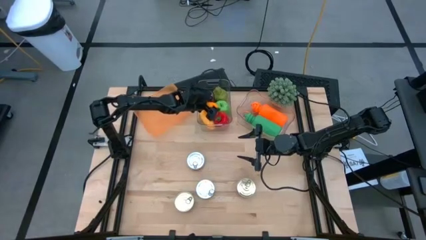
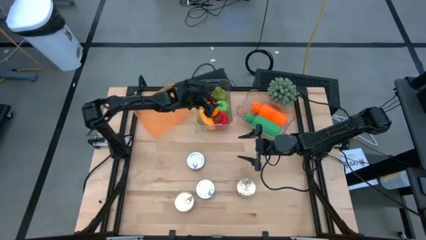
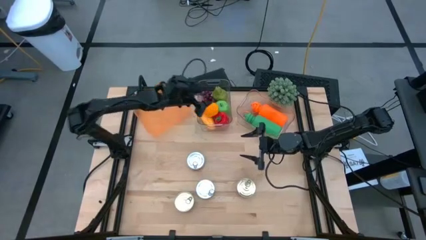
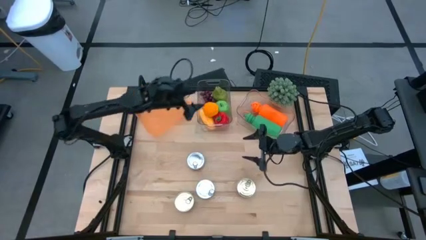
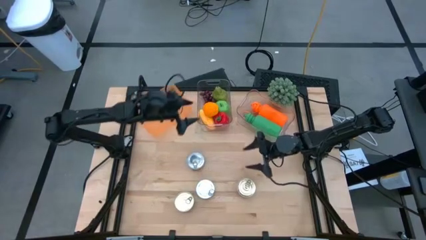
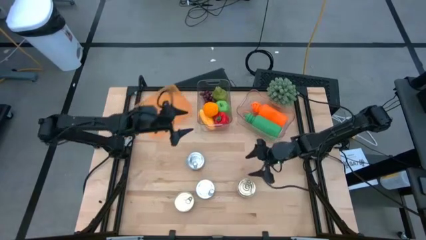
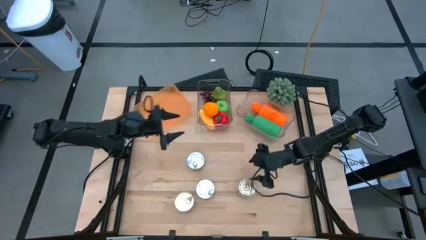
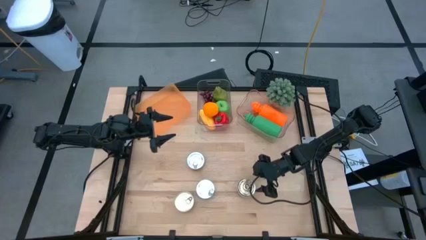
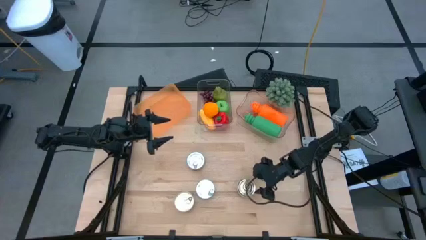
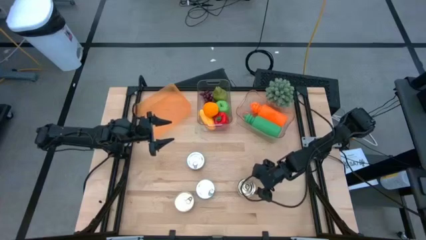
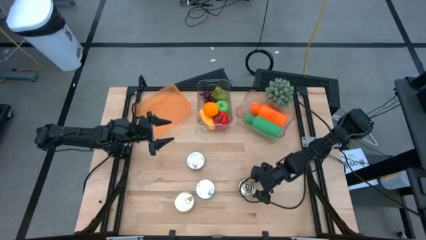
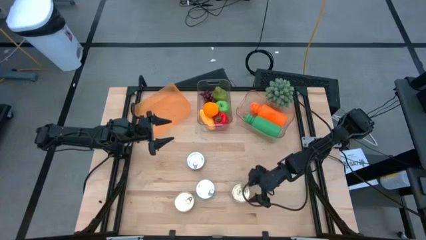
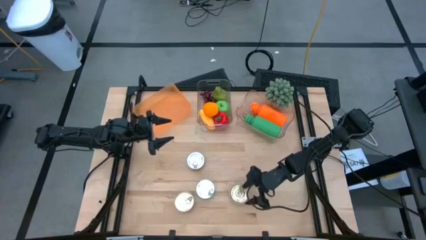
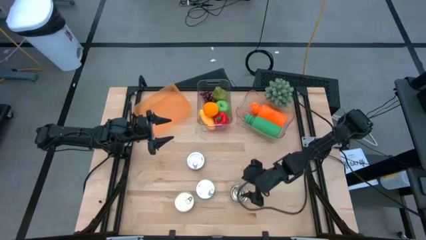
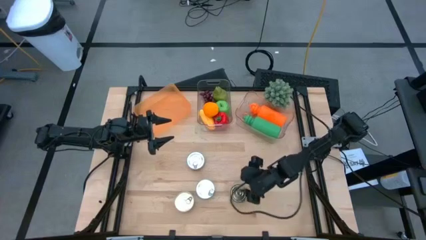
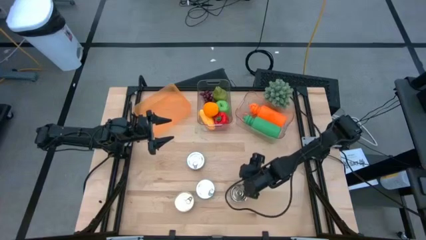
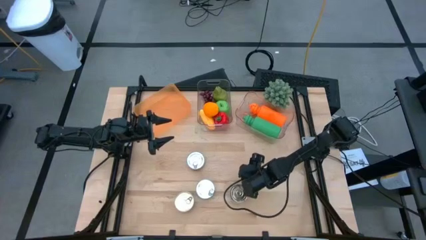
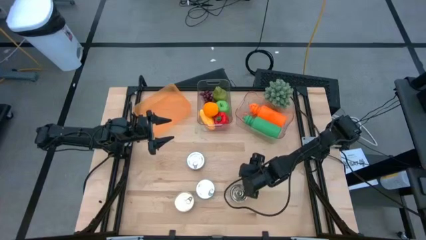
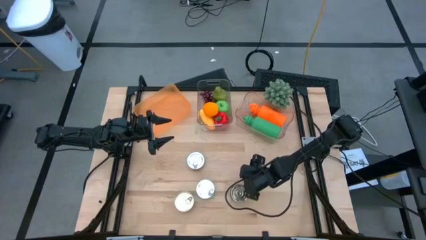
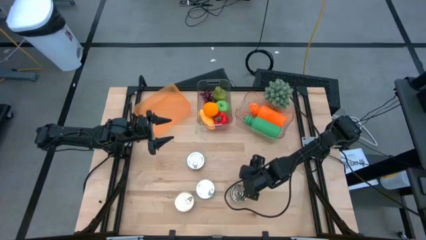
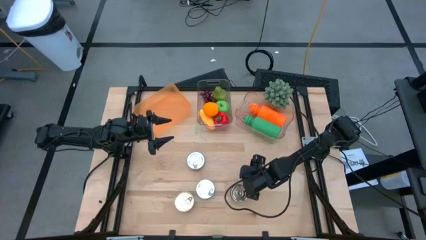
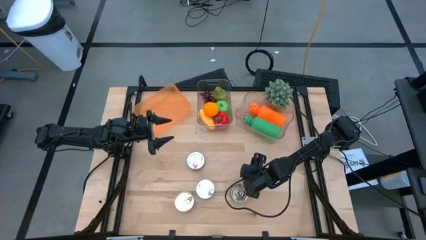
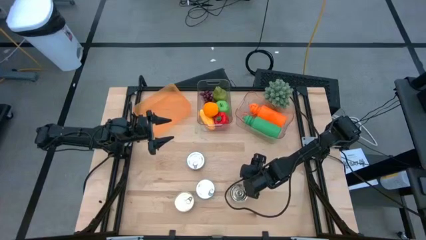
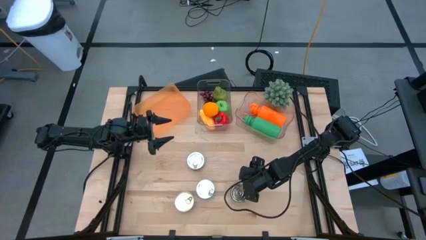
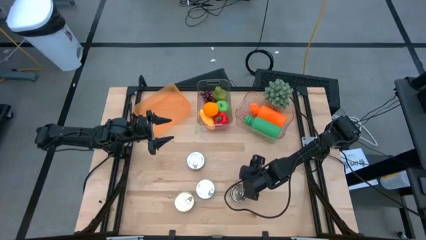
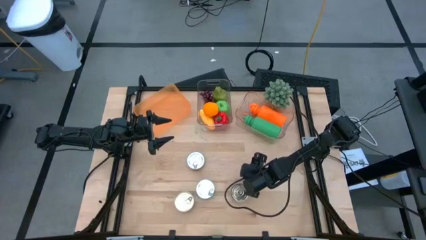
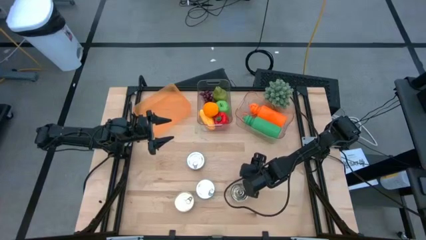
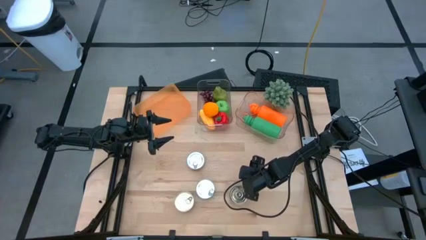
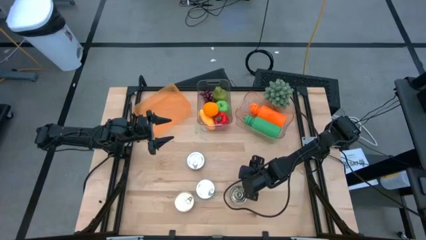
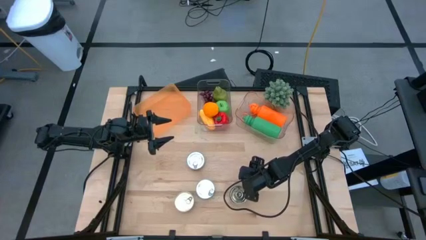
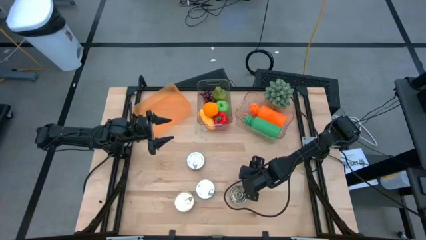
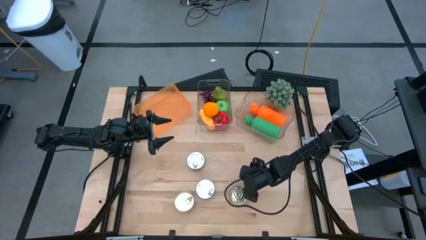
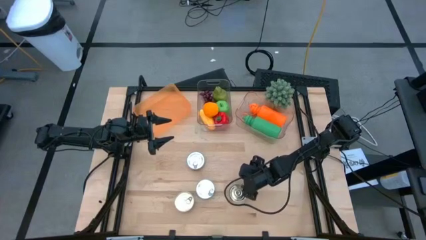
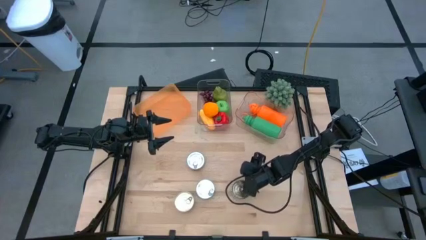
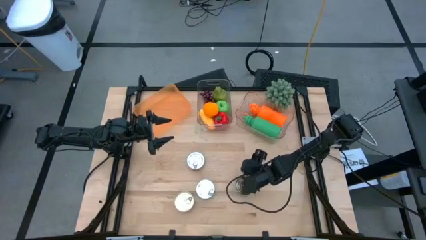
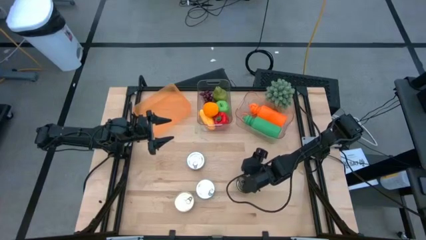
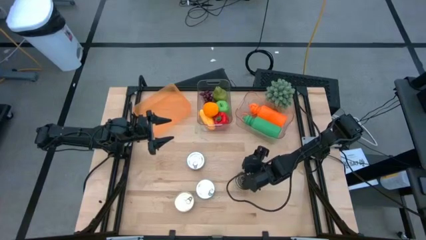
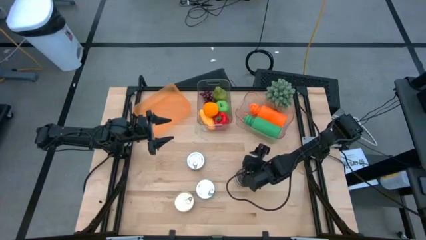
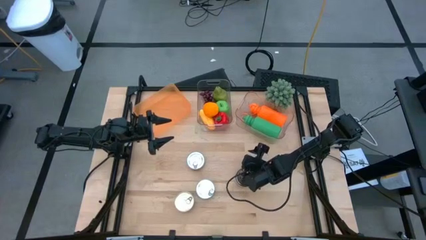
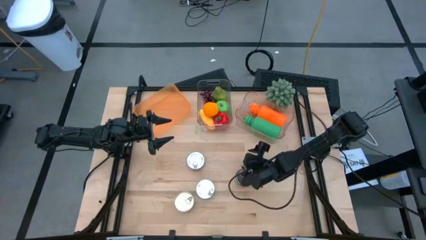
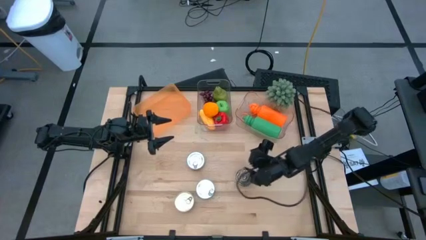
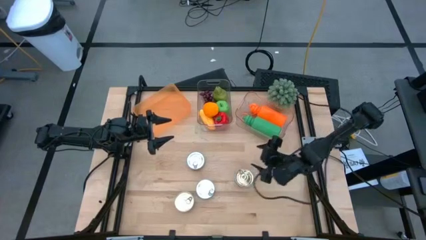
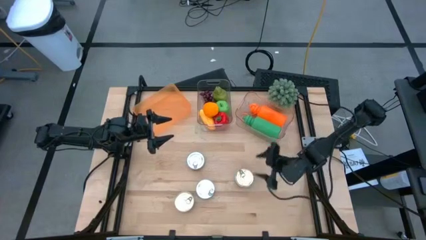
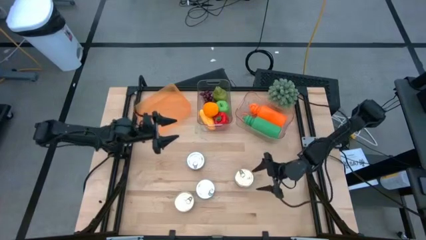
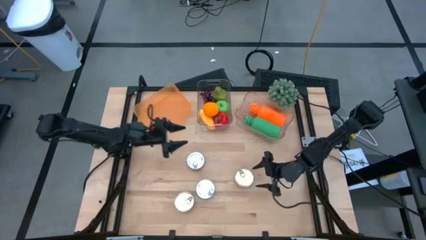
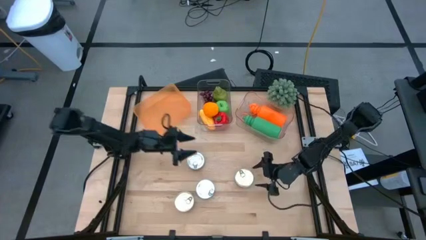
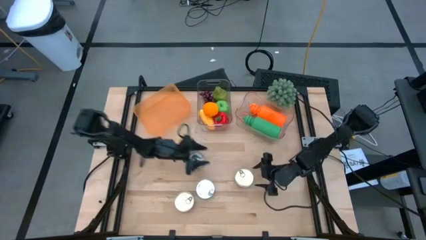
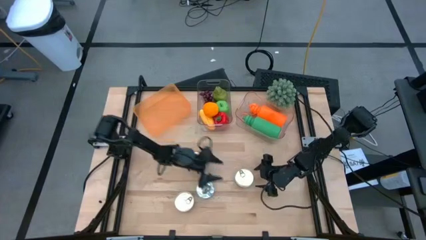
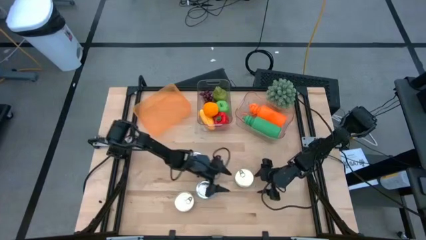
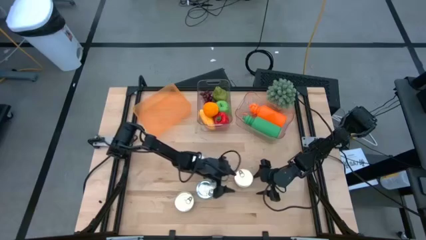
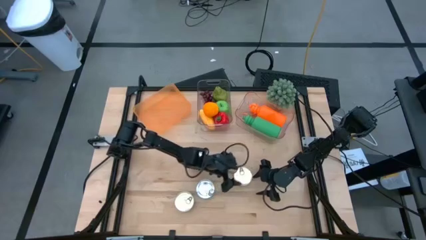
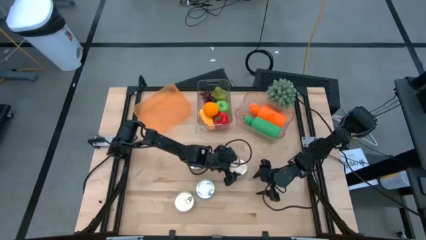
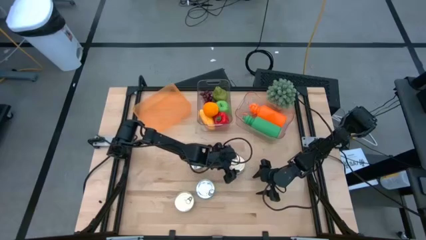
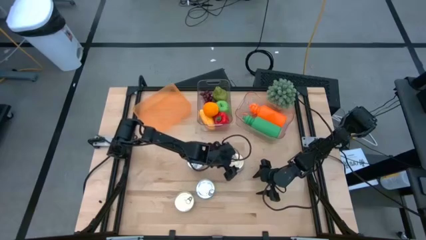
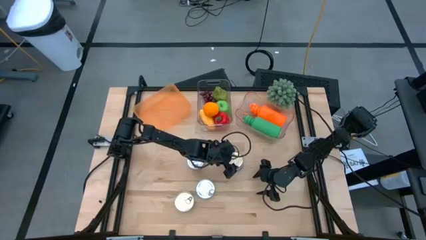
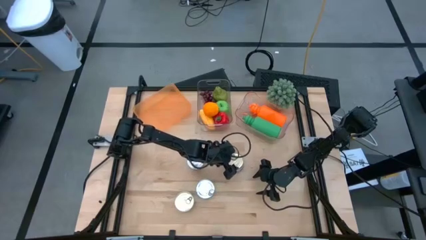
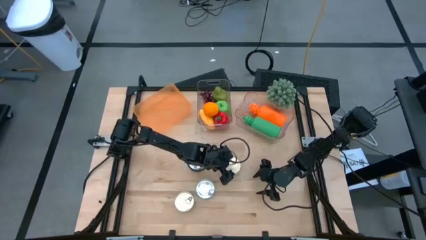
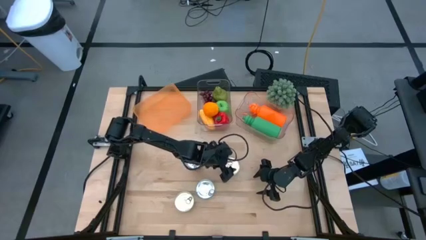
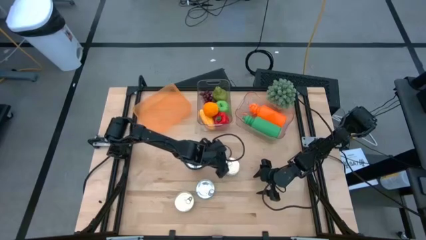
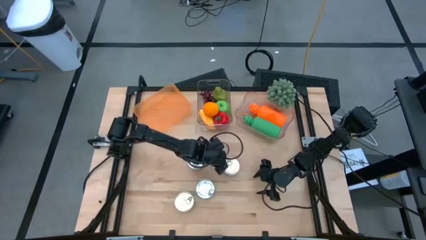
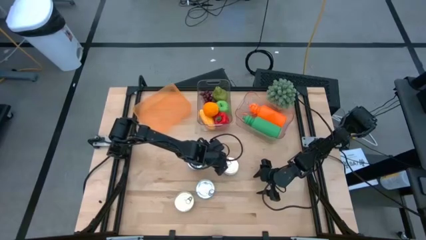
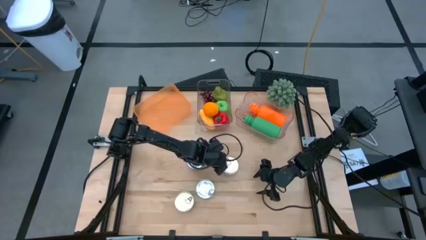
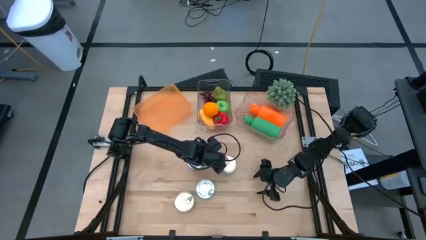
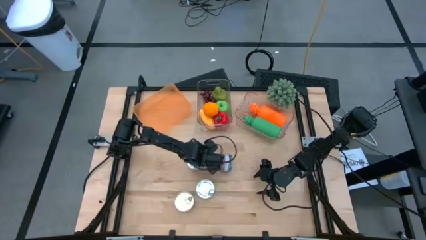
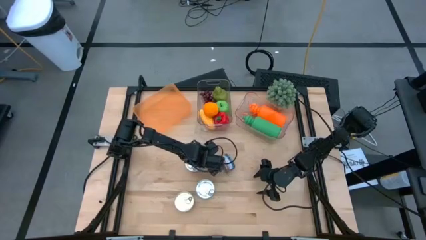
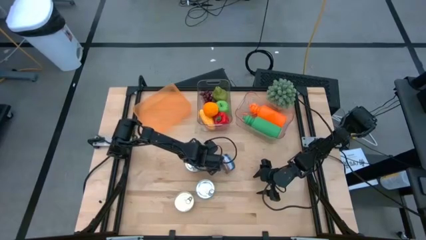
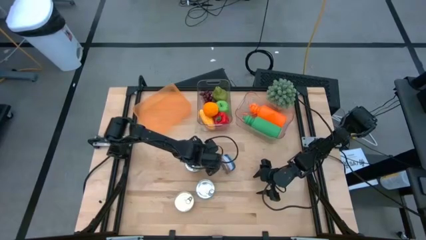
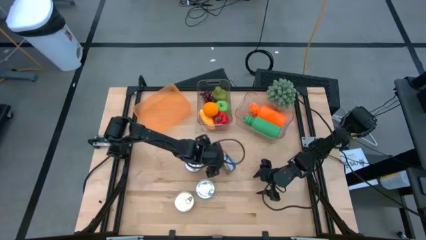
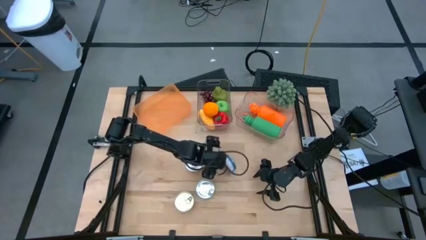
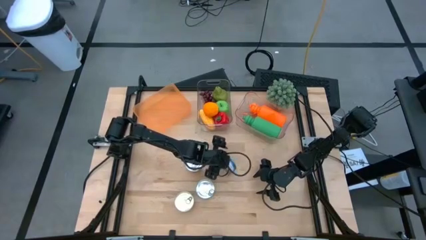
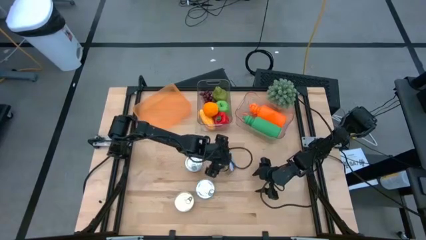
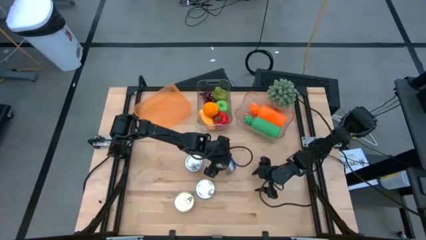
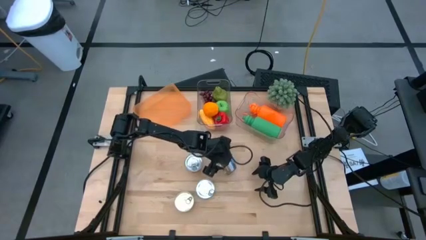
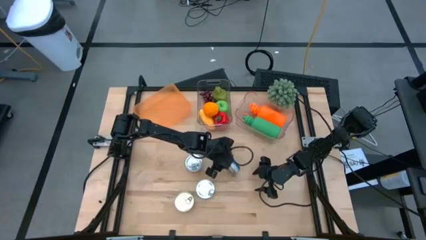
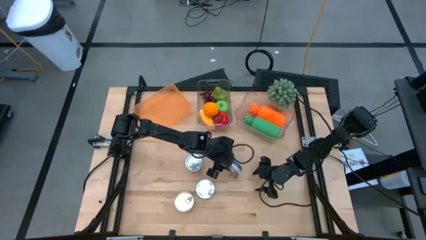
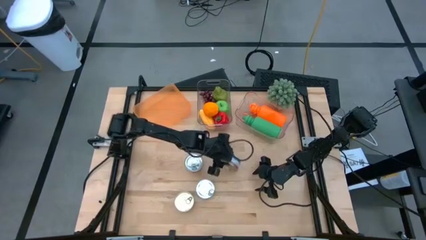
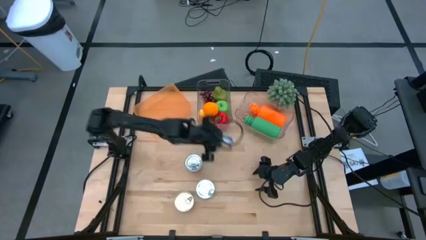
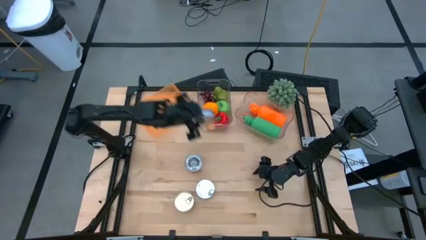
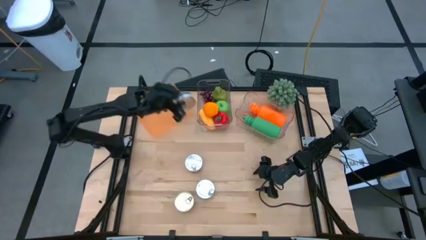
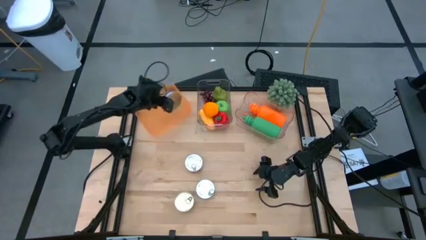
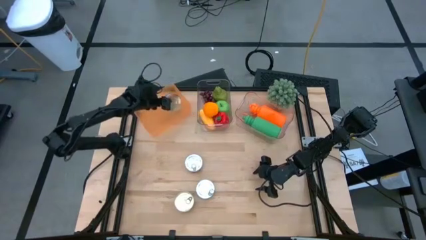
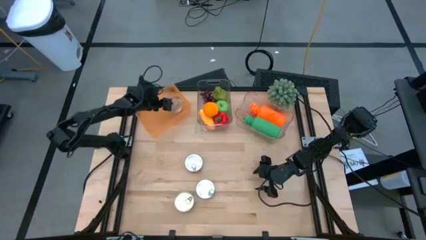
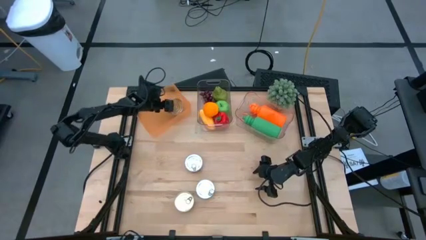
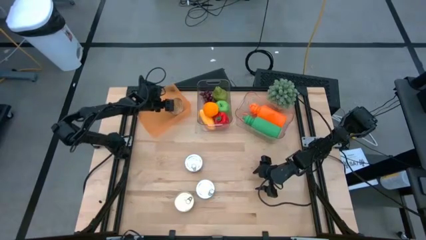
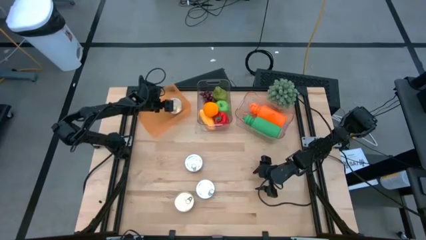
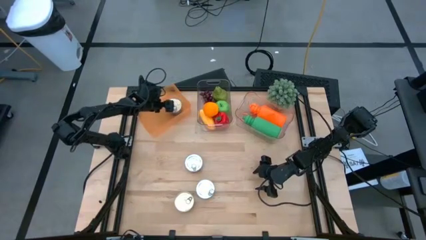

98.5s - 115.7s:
Task: Pick & Place Food Item
Put the right blue tuna can into the orange bin
